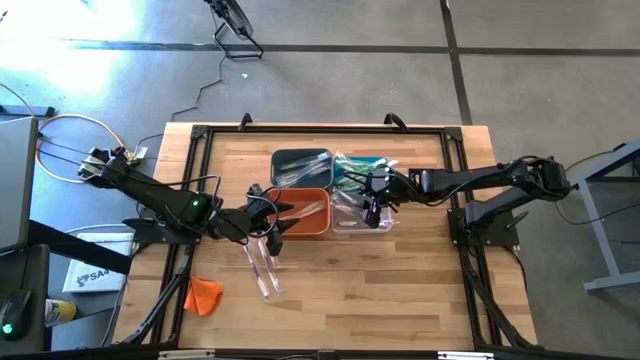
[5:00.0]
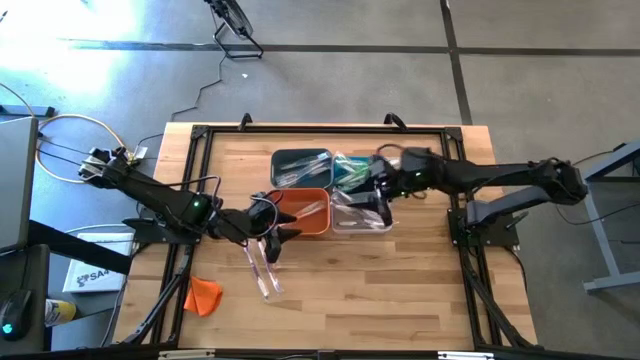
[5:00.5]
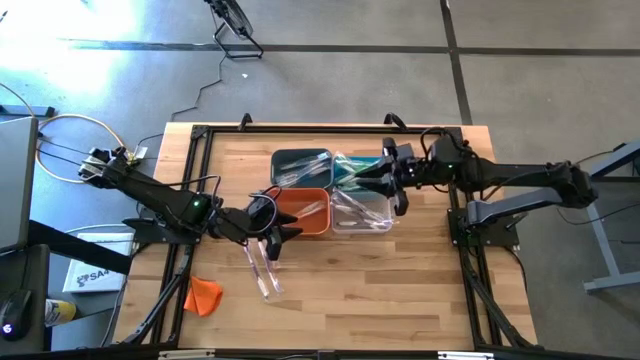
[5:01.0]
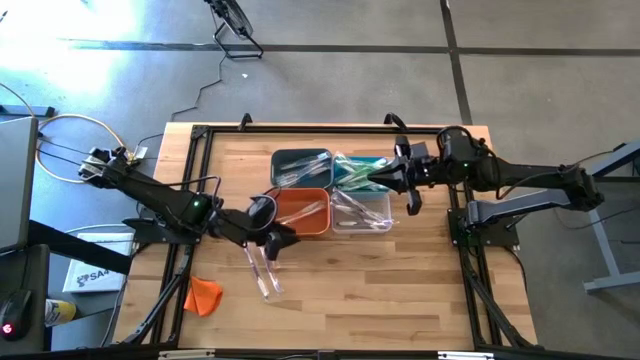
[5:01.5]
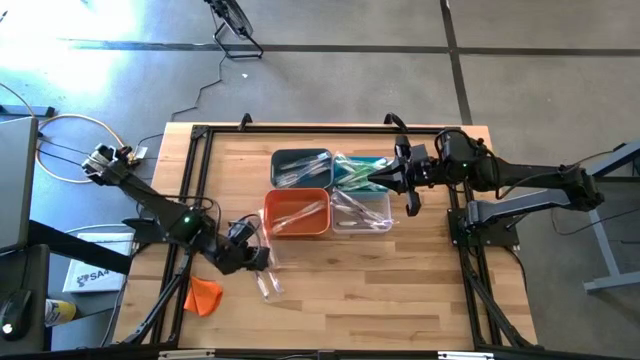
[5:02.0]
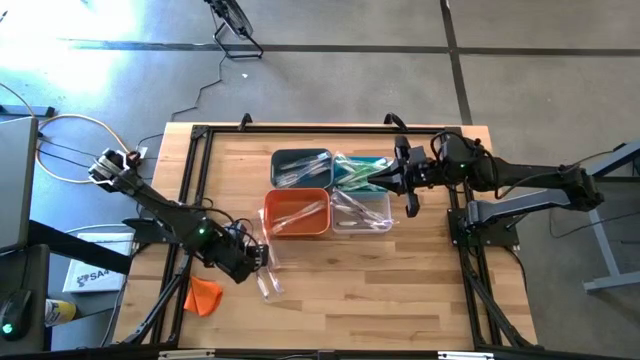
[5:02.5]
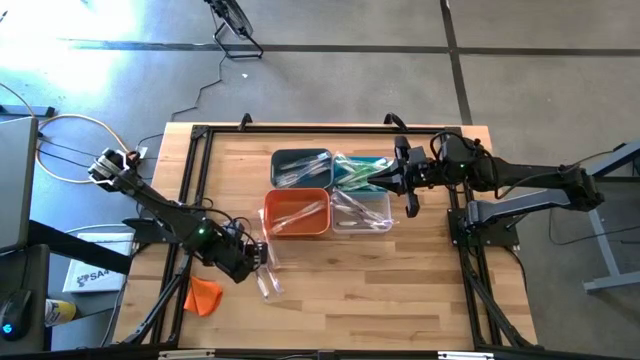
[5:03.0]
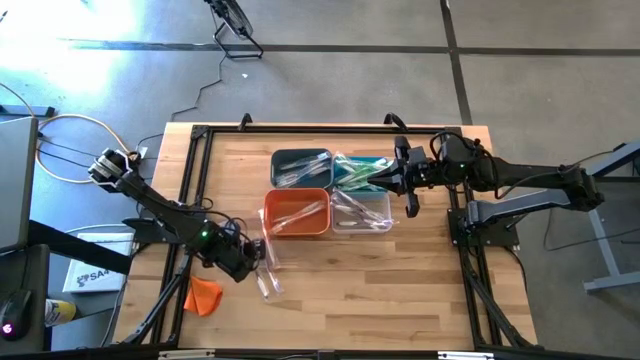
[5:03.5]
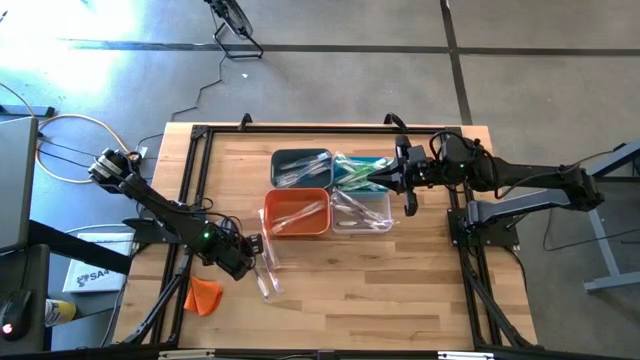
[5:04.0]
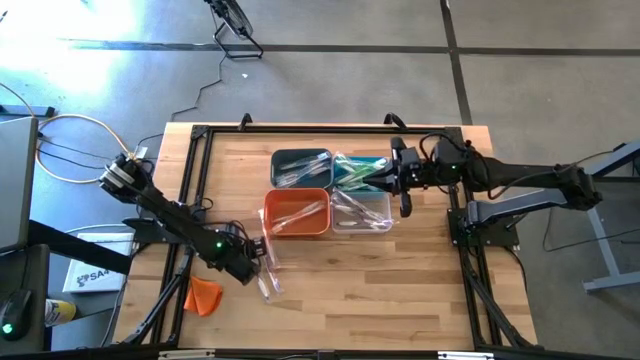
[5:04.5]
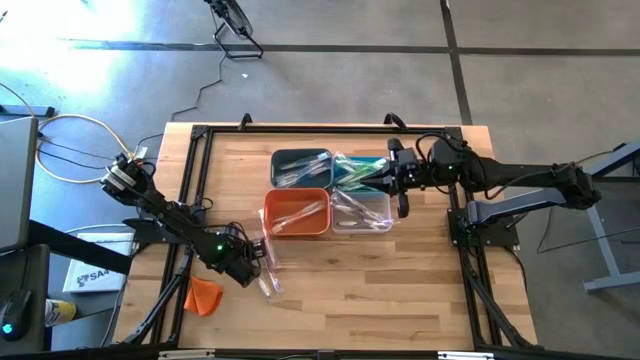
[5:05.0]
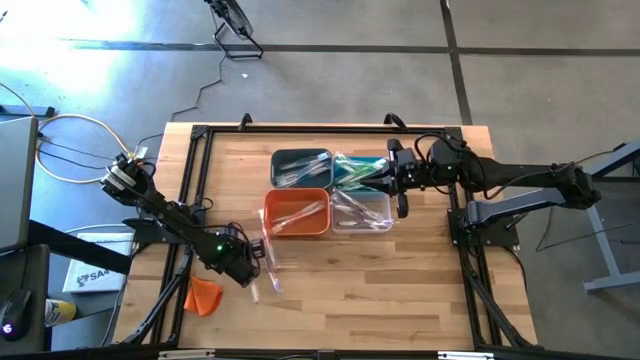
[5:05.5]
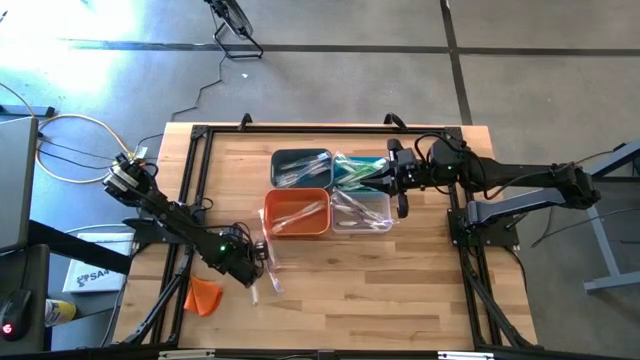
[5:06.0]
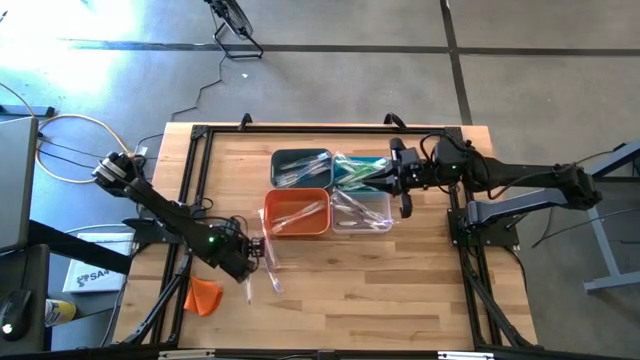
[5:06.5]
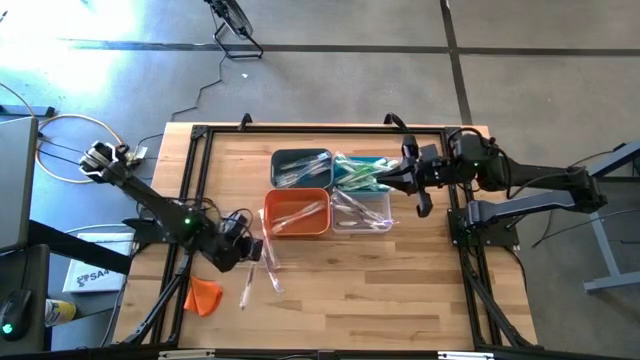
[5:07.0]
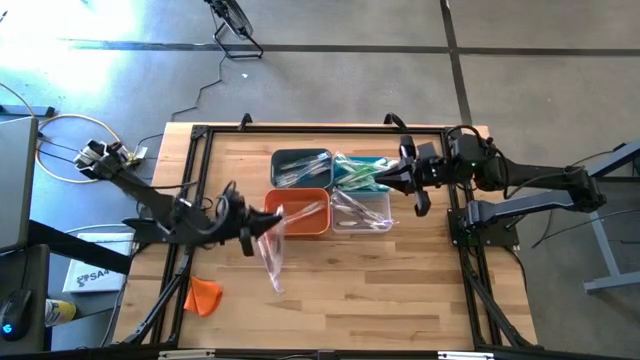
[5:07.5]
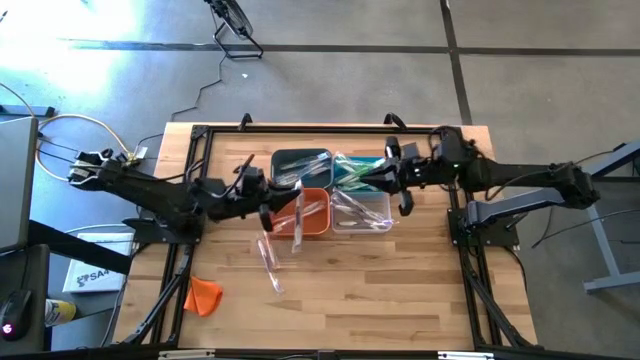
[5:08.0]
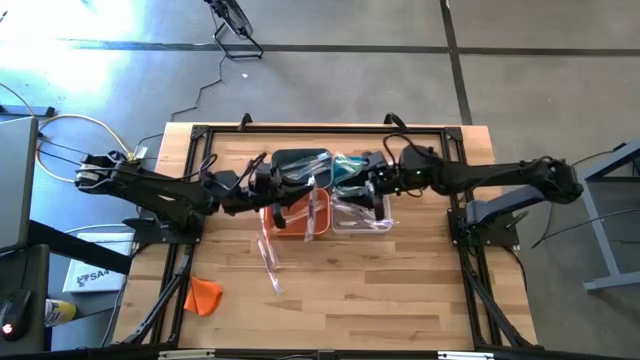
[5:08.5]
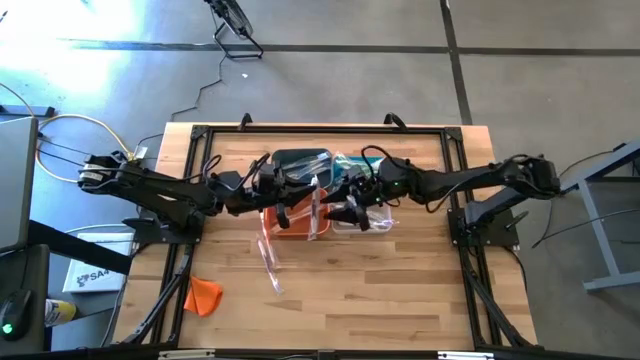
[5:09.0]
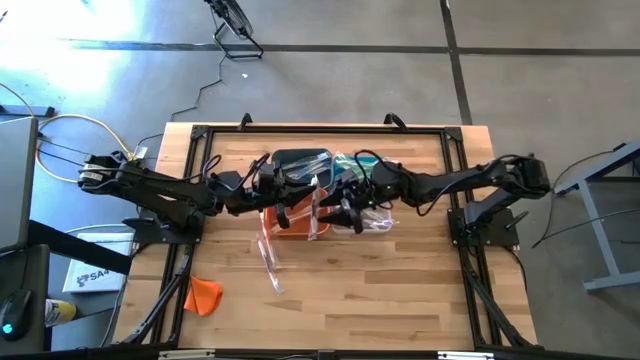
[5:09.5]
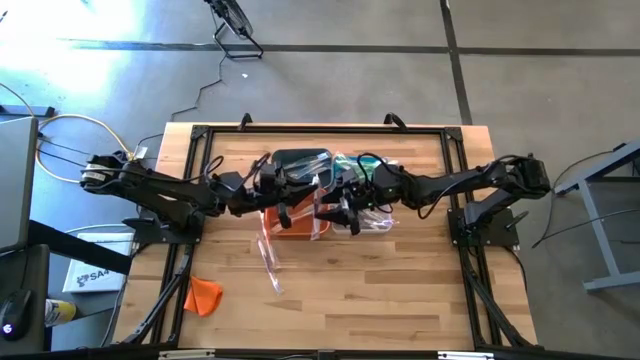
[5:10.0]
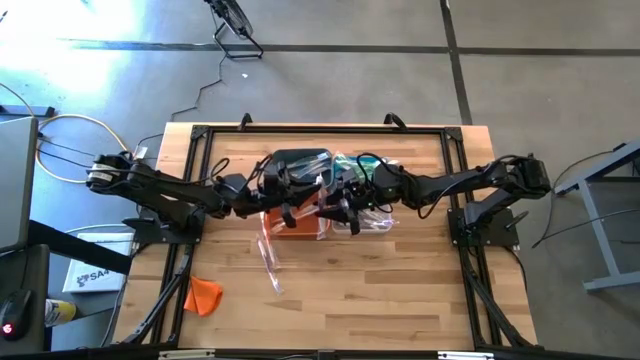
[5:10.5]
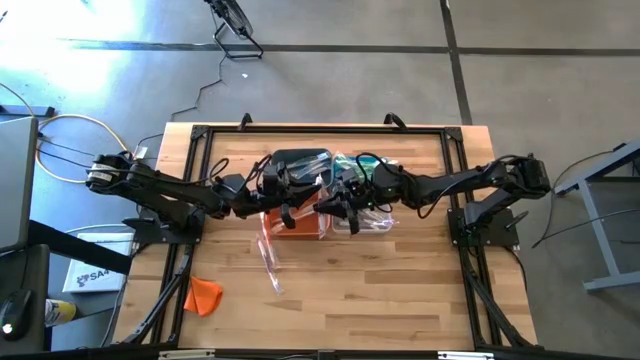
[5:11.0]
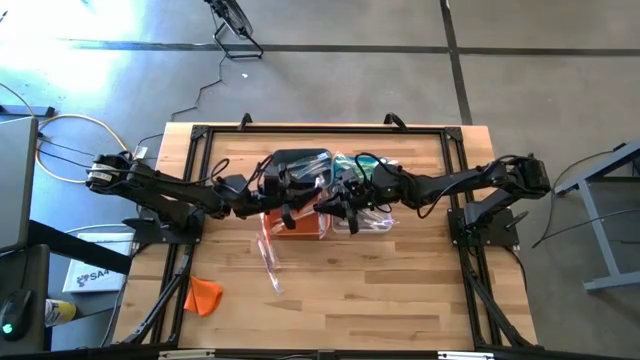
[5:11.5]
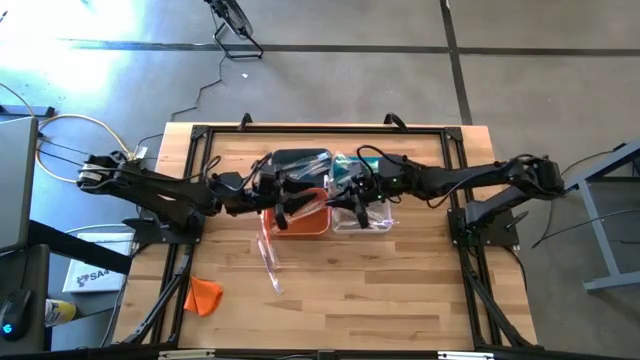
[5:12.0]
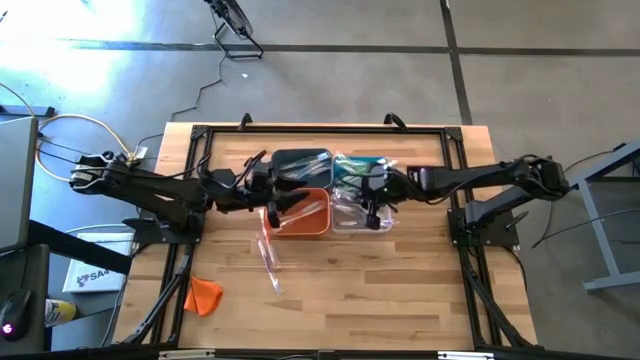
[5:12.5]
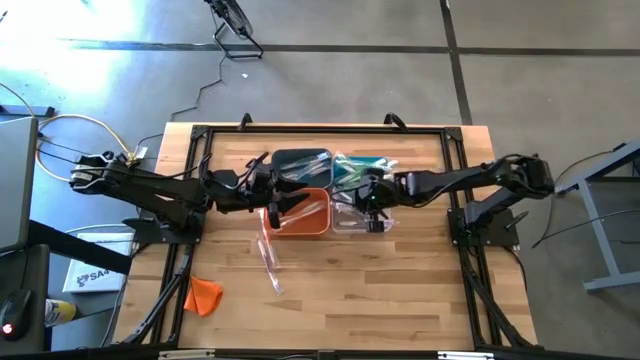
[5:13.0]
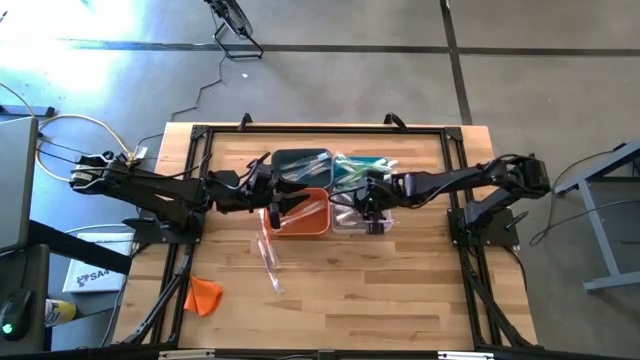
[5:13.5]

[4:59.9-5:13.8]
Task: Pick & Place Toothbrushes
Put the purple toothbrush into the transparent bin

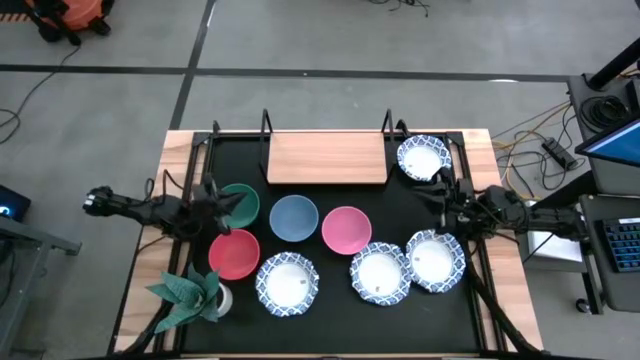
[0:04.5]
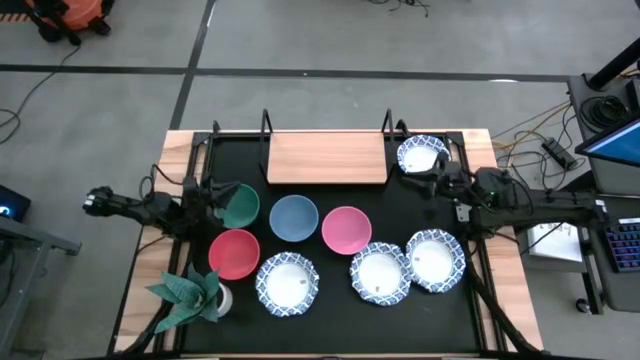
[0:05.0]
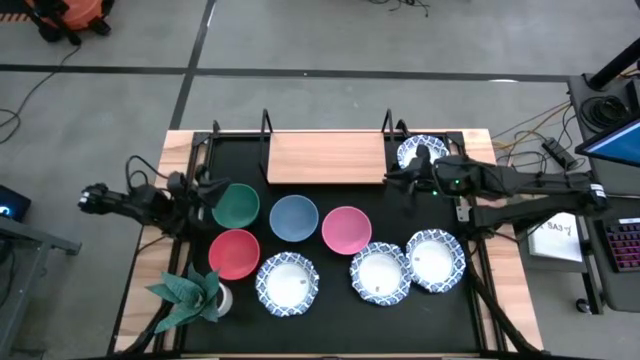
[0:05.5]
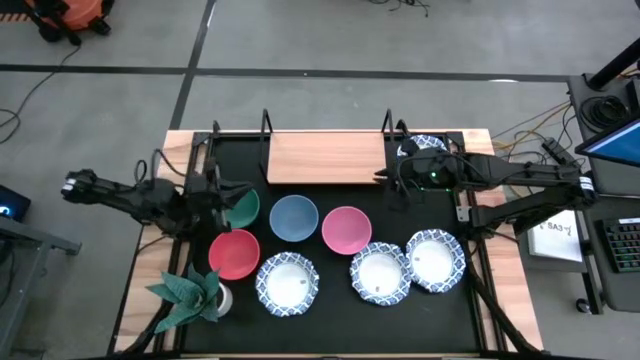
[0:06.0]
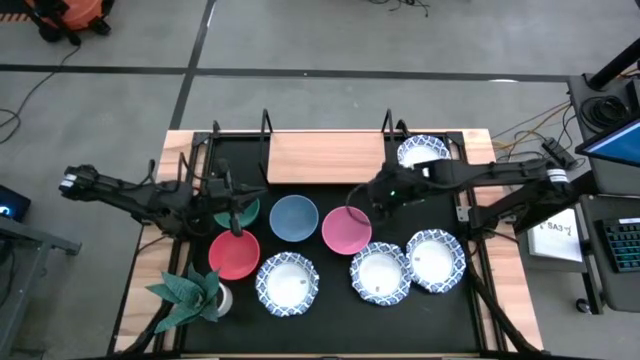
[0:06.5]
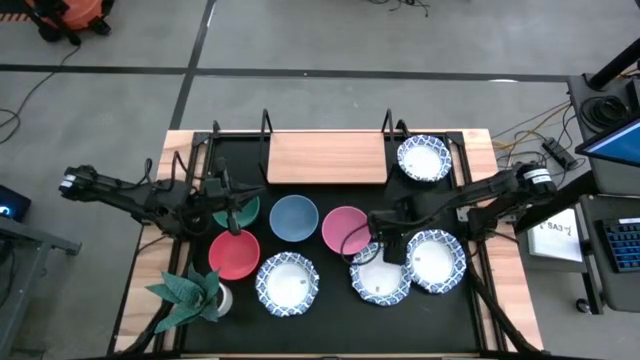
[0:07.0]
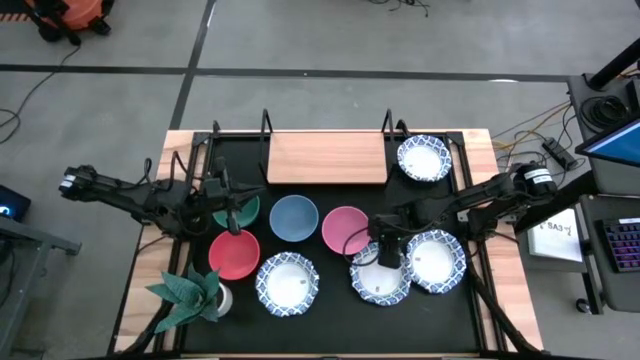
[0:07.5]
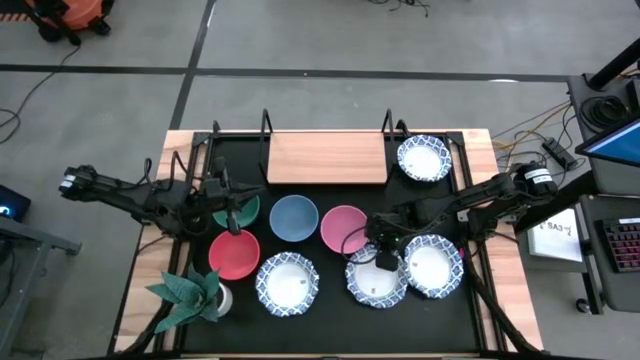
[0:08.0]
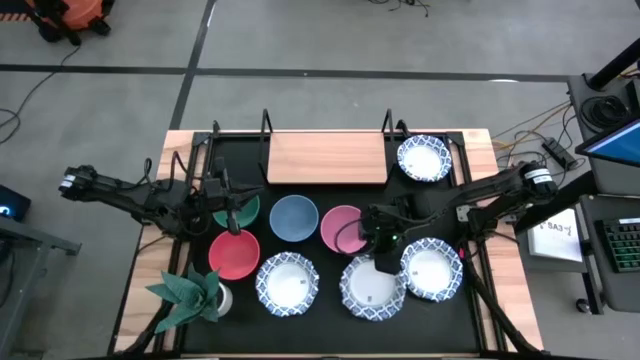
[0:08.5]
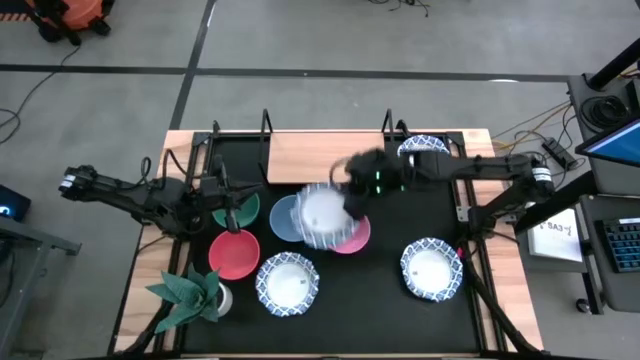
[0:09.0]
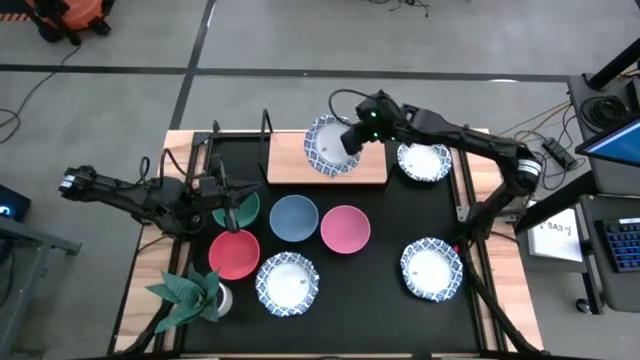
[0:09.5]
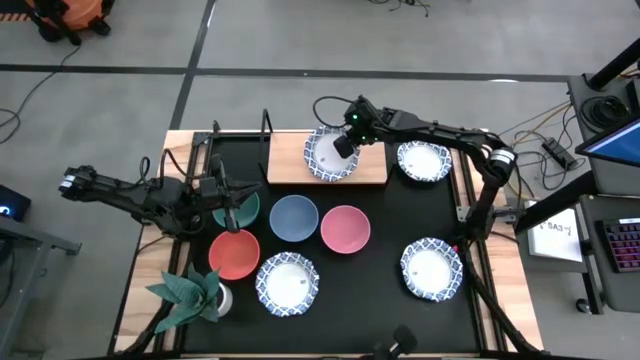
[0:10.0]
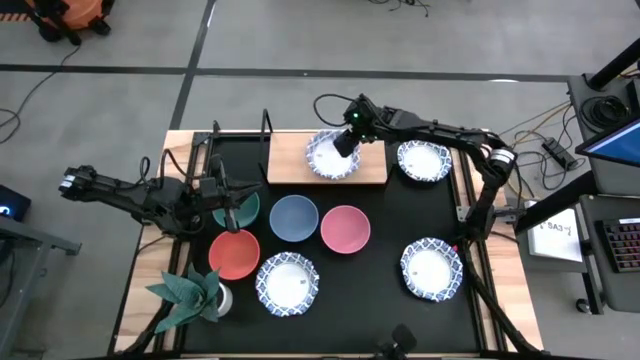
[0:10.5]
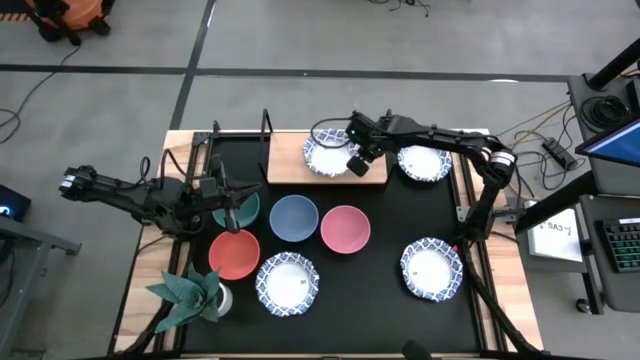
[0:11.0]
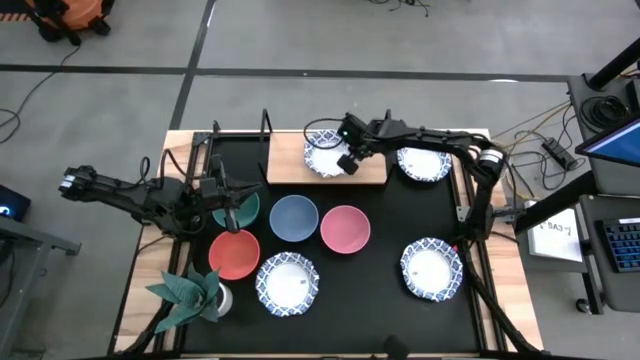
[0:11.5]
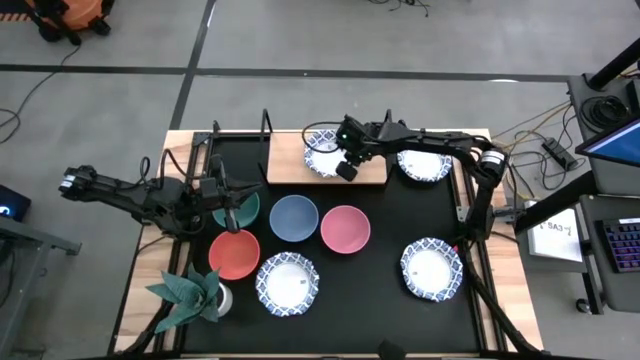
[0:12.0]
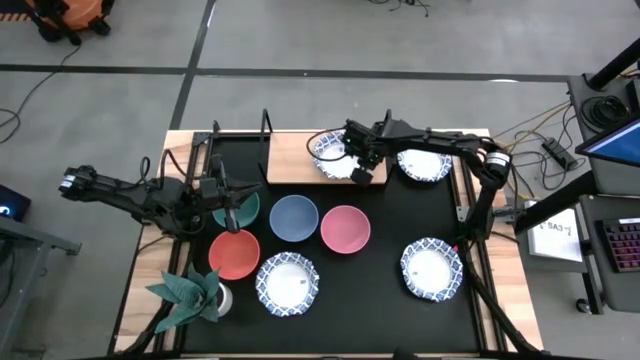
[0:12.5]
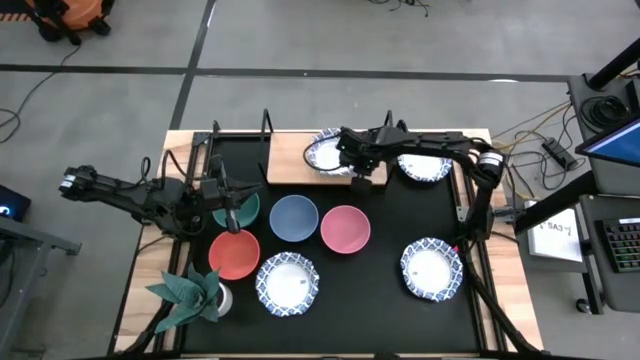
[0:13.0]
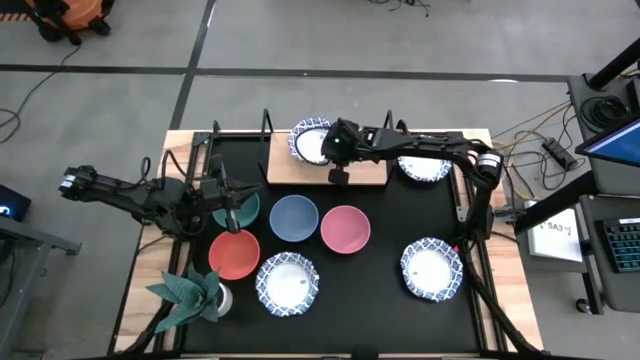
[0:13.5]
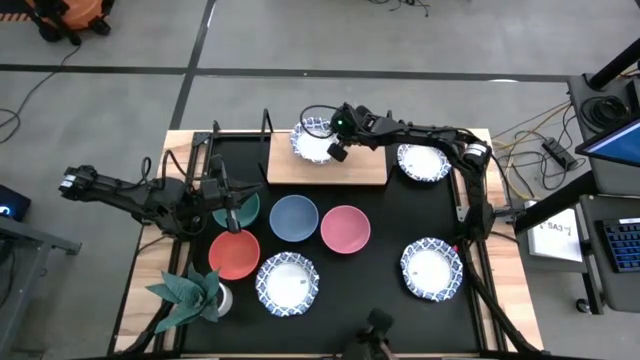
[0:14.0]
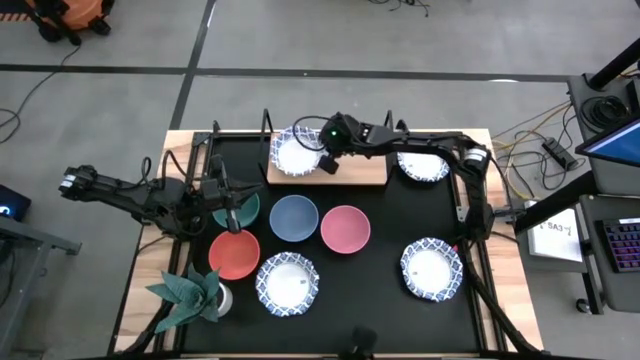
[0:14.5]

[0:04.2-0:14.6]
Task: Place and stack bowls onto a shelf
Put the white bowl on the shelf
